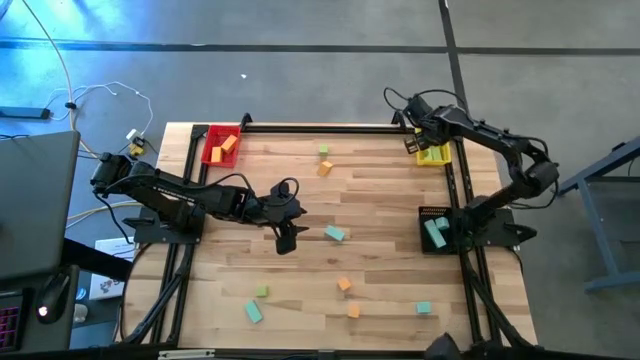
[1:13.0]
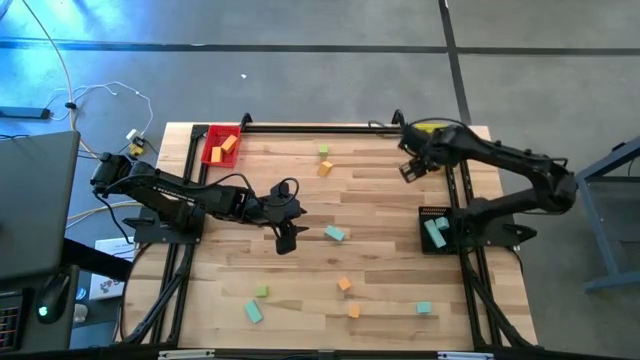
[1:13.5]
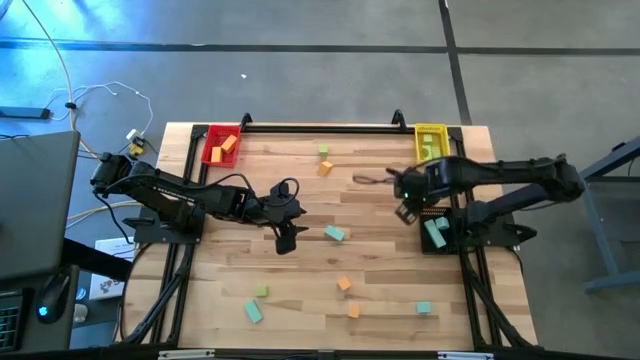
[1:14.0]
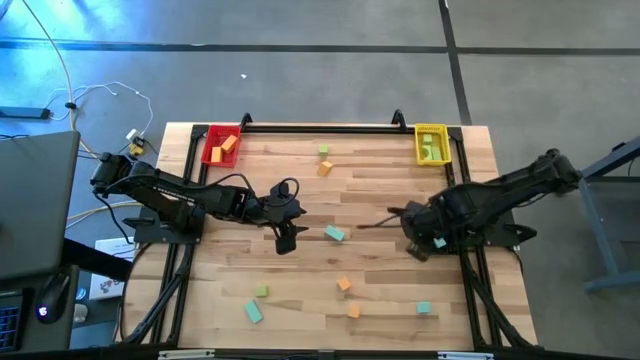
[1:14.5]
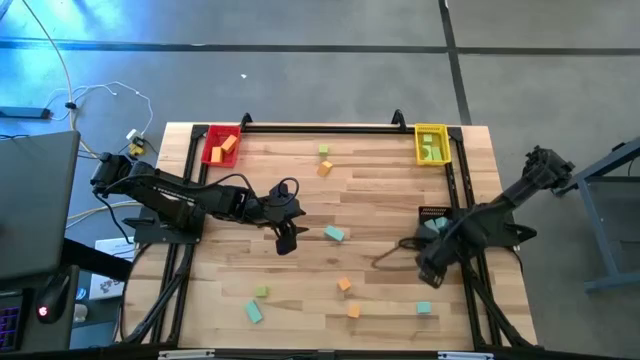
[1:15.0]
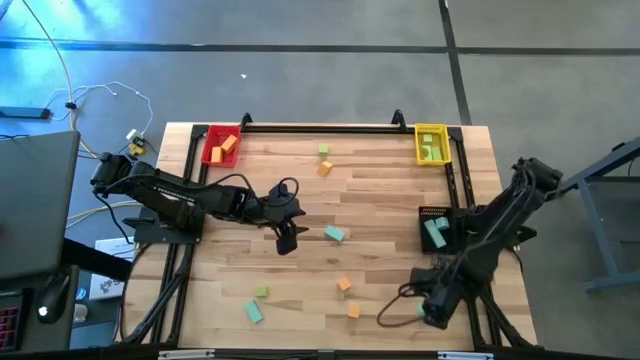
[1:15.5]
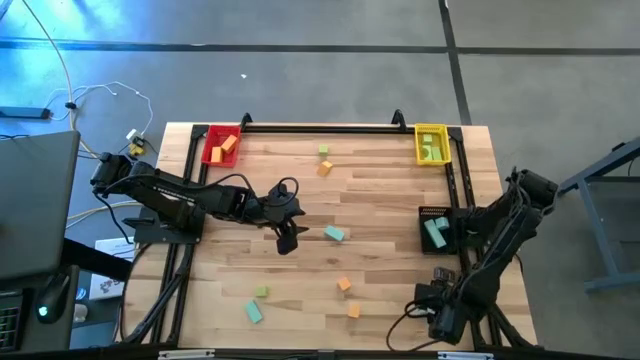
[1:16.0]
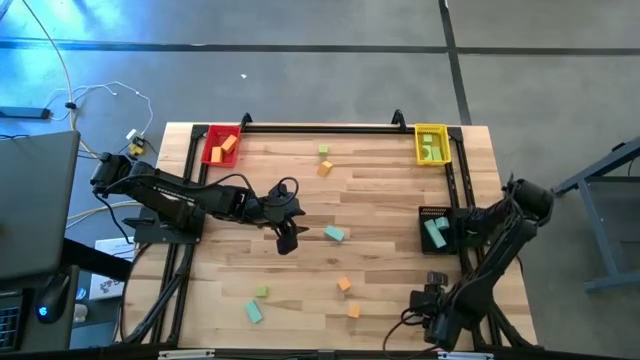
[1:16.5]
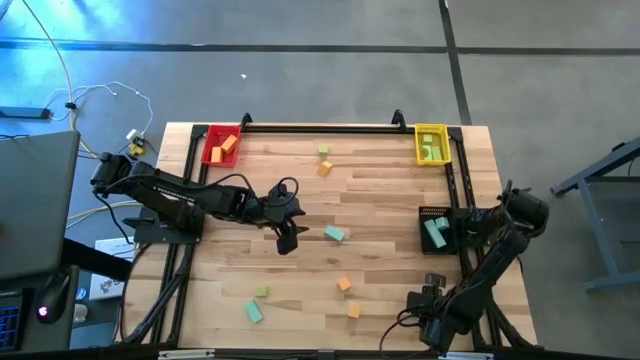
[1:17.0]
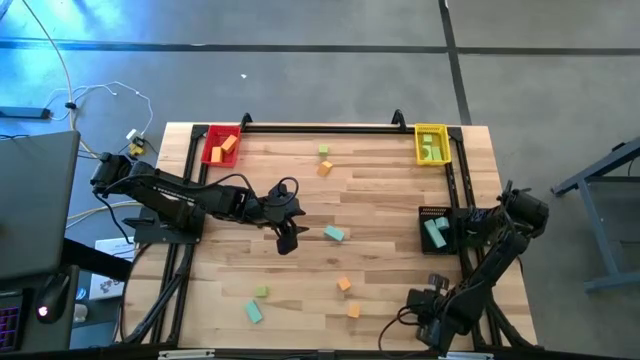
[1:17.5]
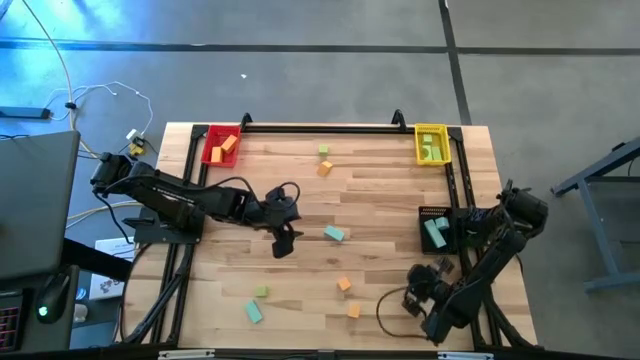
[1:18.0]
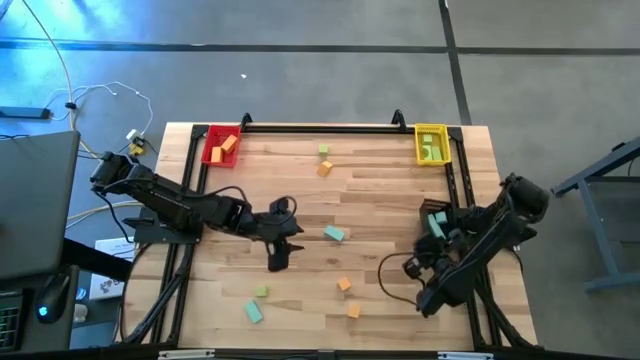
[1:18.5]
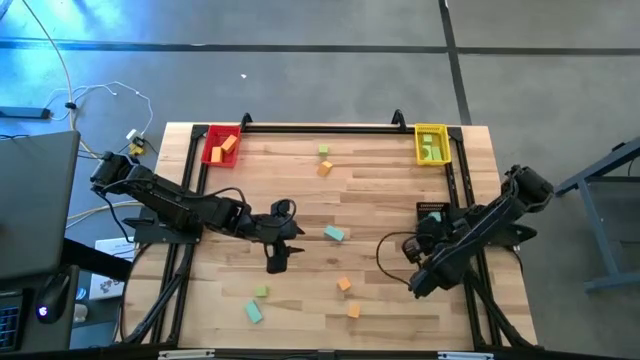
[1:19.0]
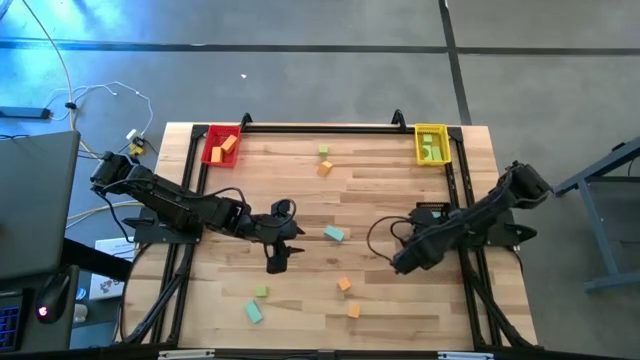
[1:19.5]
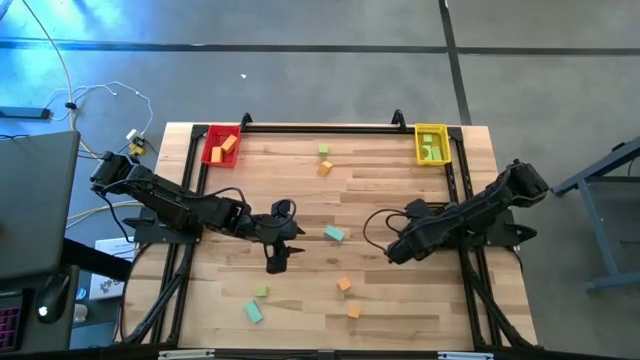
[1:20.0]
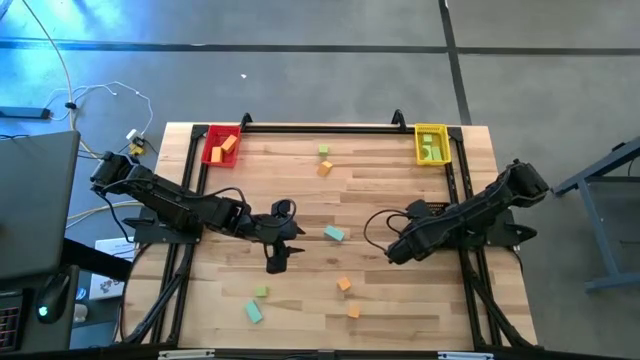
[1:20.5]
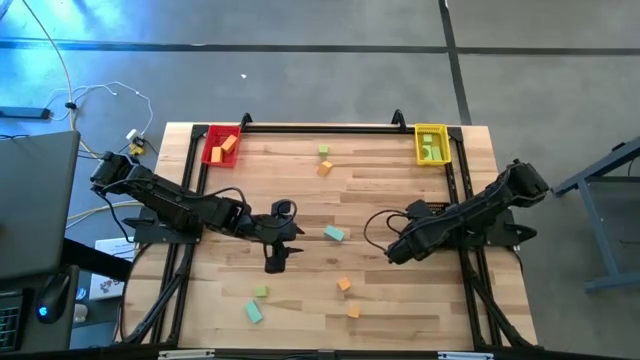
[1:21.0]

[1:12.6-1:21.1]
Task: Sort & place blocks by color
Put the blue block into the black bin

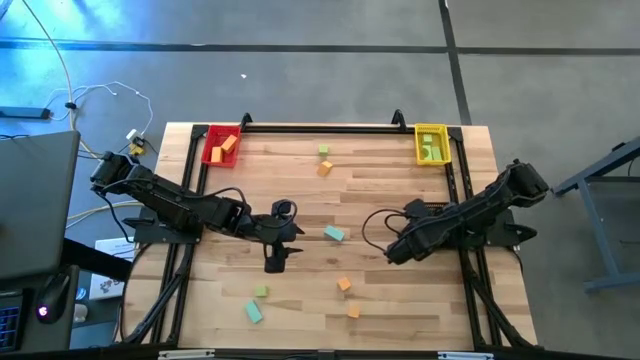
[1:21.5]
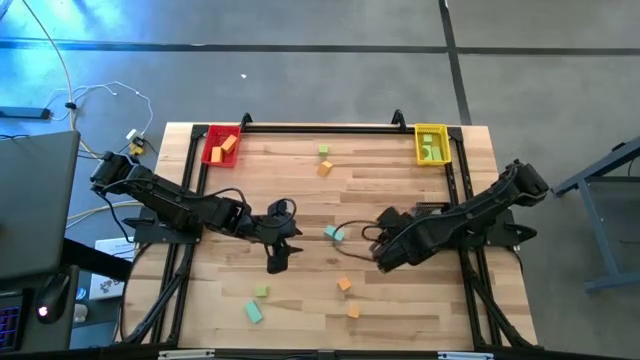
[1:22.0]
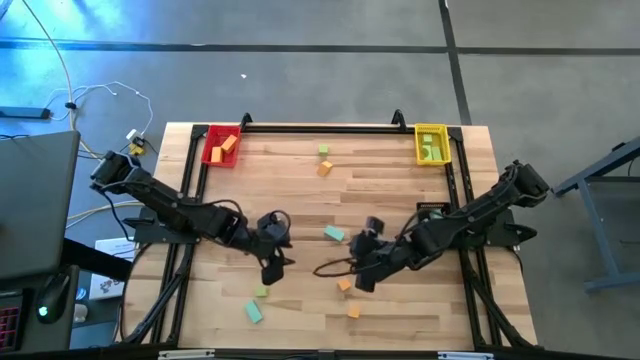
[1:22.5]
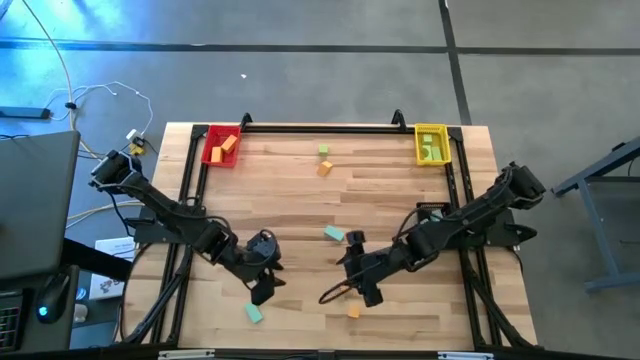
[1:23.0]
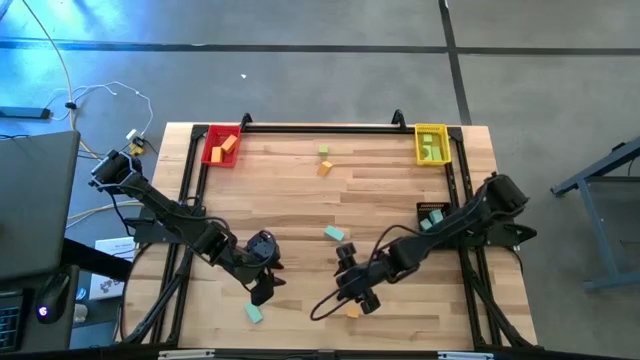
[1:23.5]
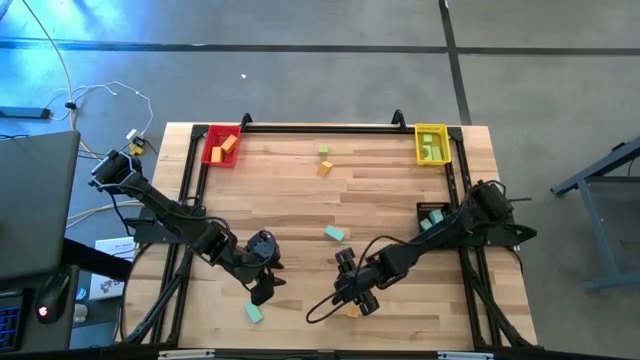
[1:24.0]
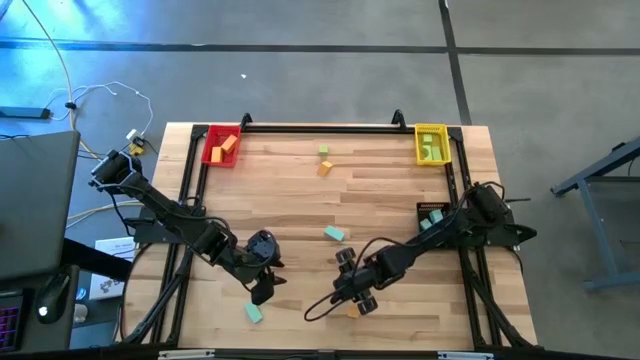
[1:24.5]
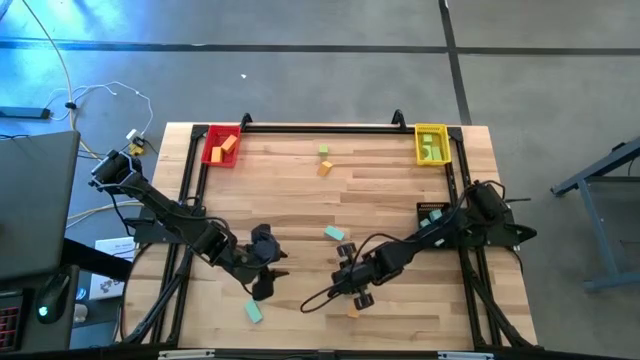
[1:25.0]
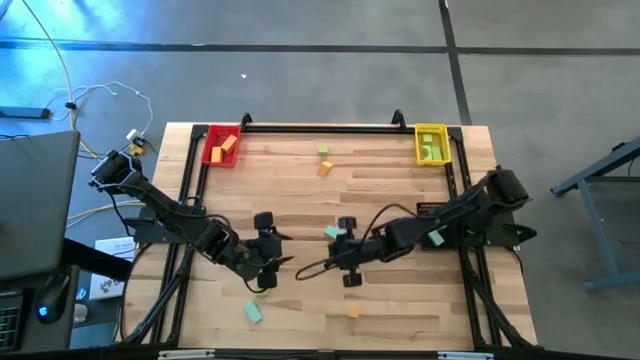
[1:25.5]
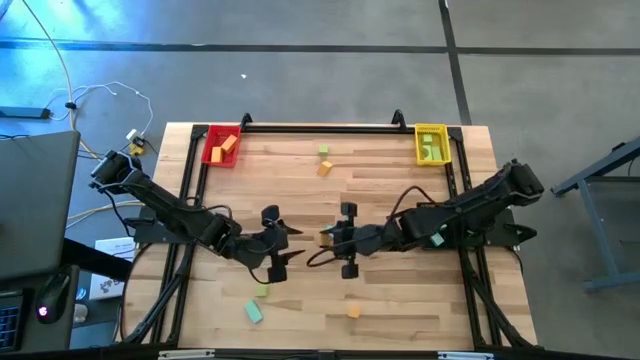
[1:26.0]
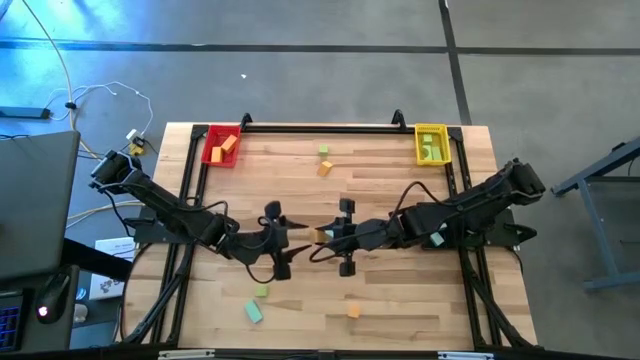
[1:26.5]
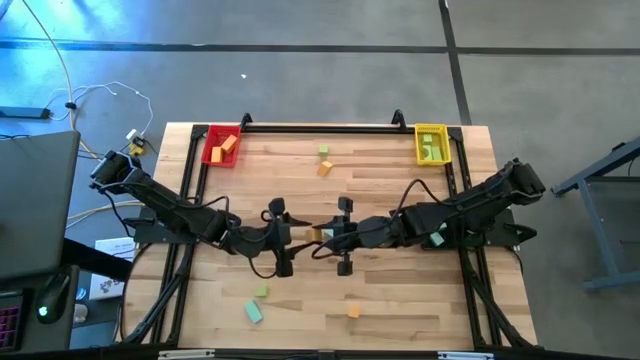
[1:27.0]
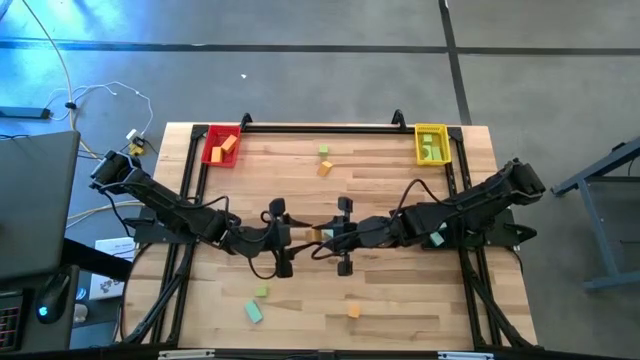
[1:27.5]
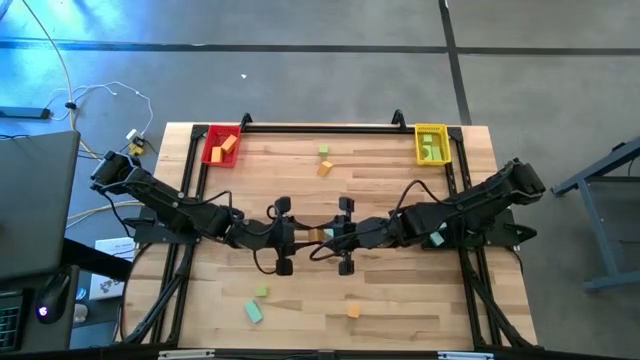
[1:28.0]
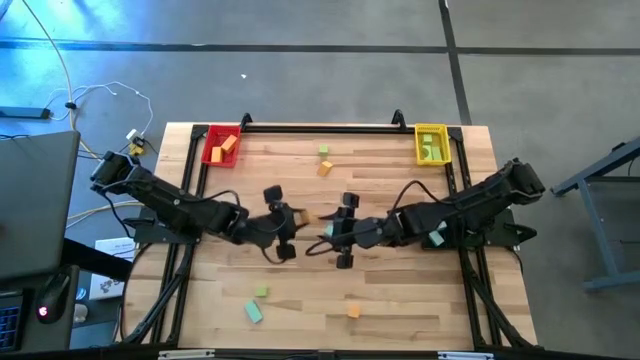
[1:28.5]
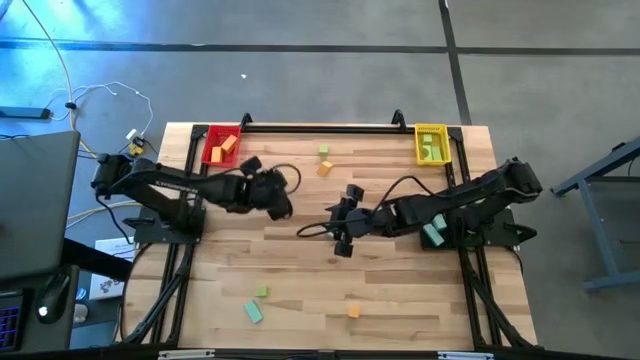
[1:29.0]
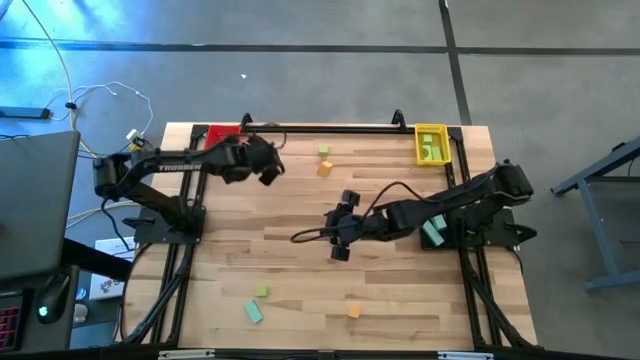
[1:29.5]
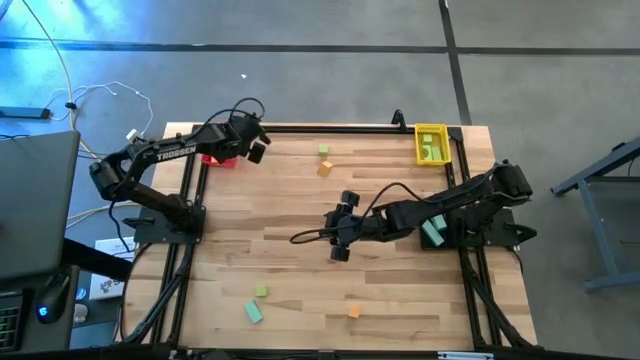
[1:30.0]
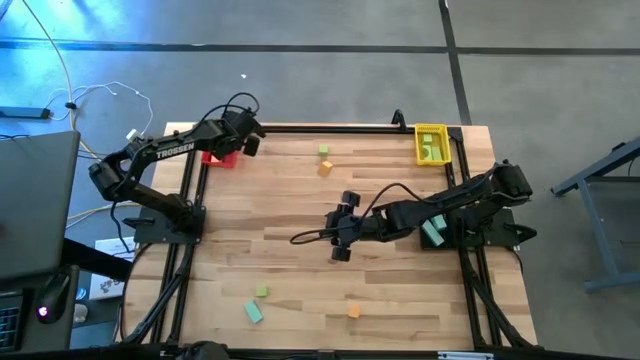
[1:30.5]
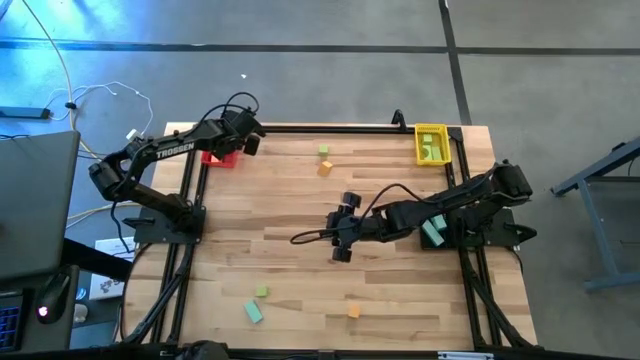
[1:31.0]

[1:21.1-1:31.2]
Put the yellow block into the red bin

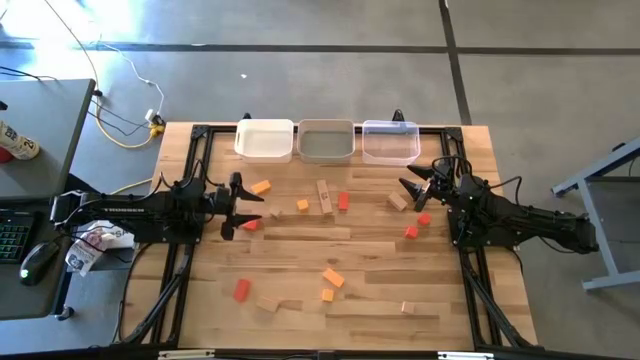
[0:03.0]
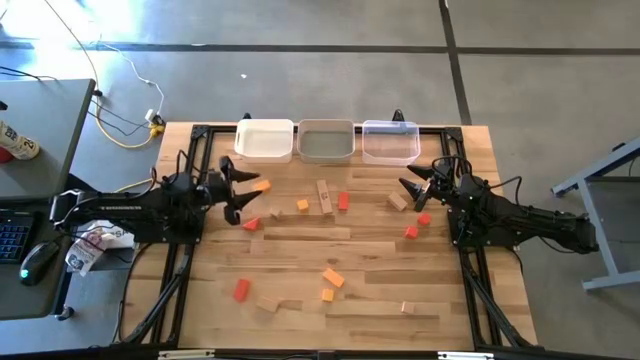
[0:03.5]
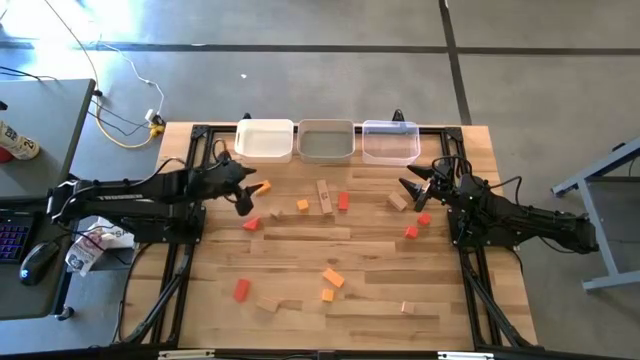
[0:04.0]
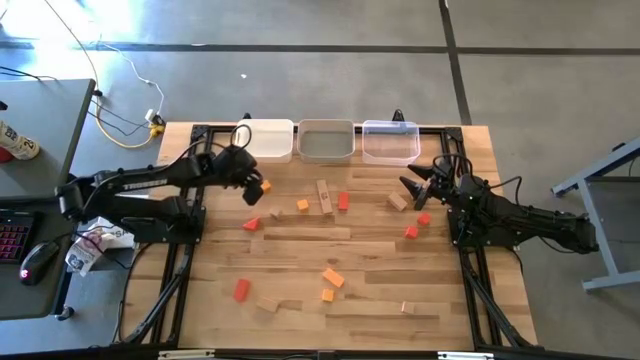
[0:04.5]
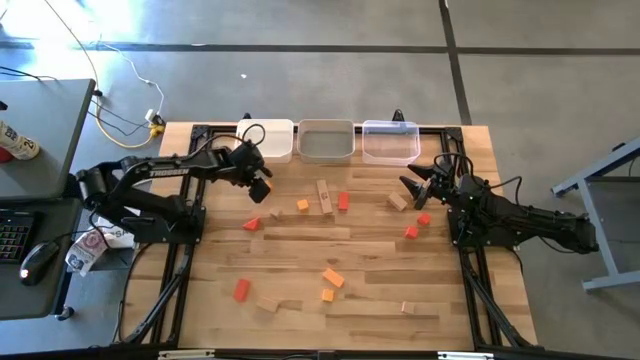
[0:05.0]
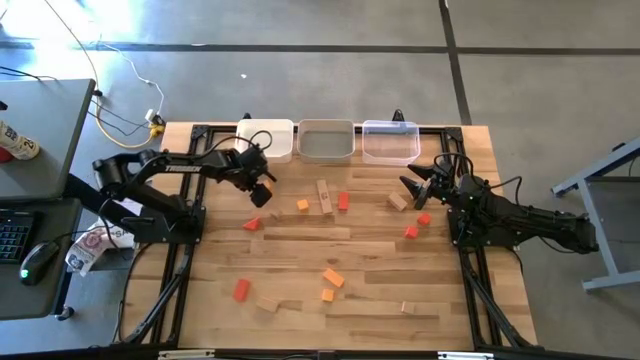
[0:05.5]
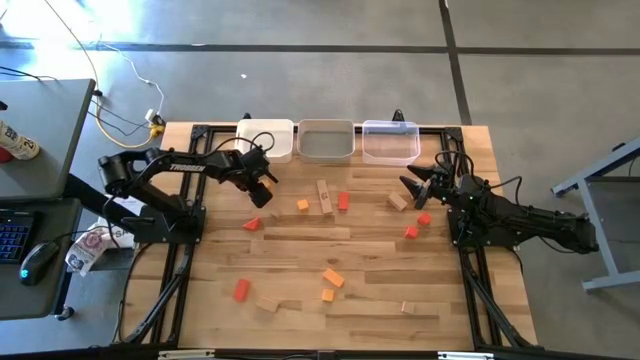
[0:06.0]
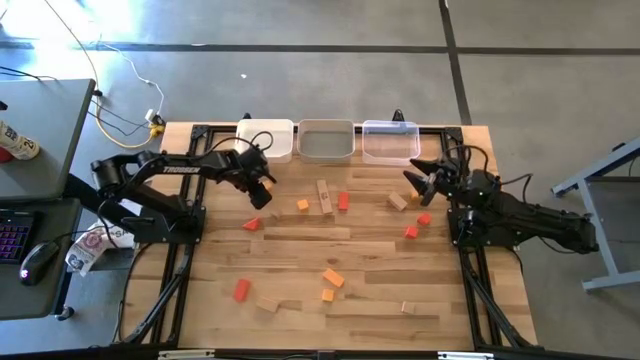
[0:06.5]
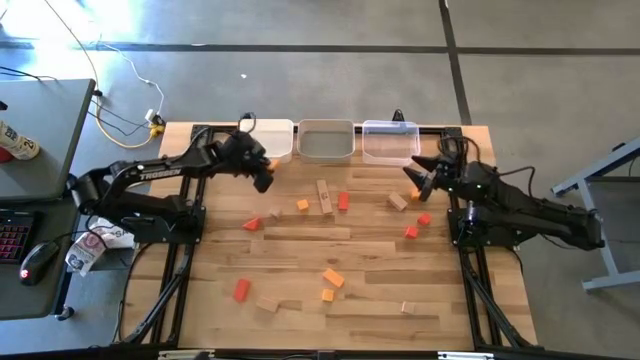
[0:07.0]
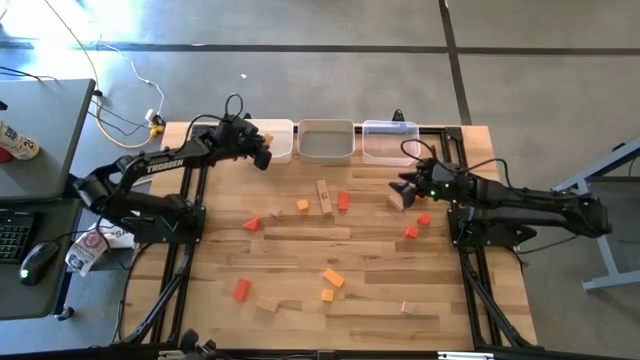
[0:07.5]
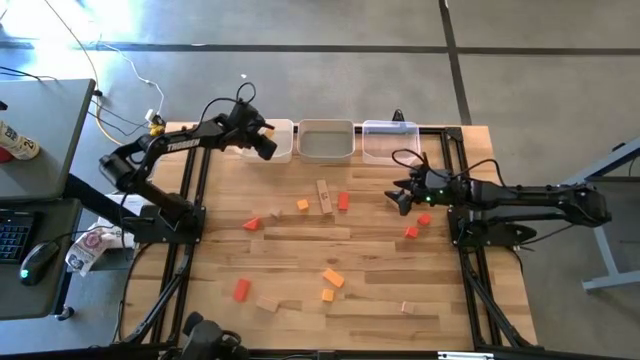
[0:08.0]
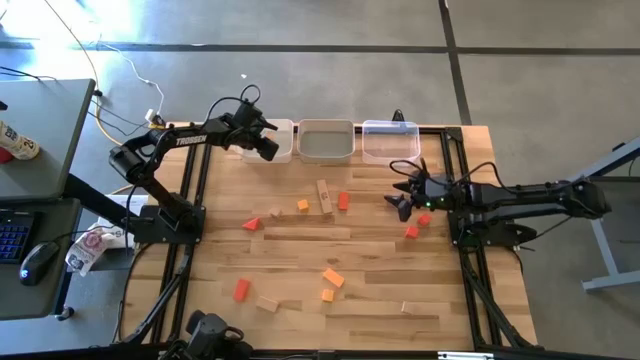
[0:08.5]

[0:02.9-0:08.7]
Task: Sort & place blocks by color
Put the yellow block into the white bin
